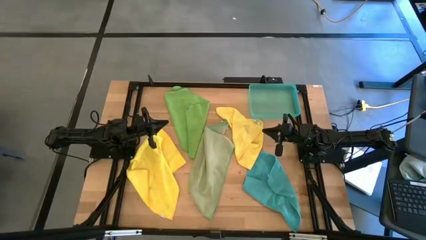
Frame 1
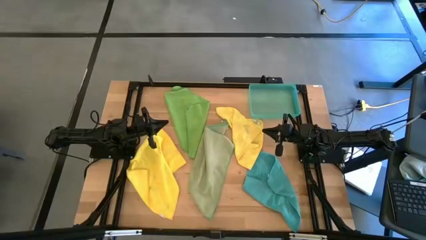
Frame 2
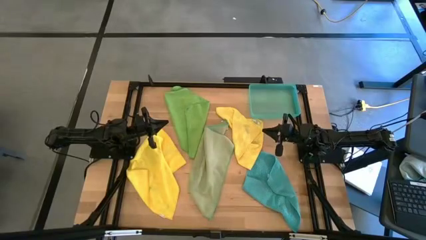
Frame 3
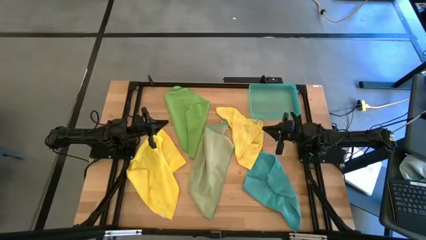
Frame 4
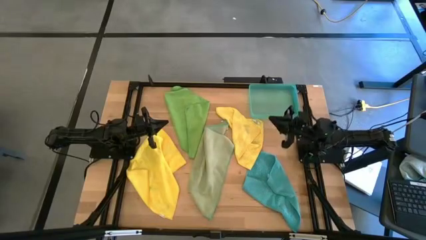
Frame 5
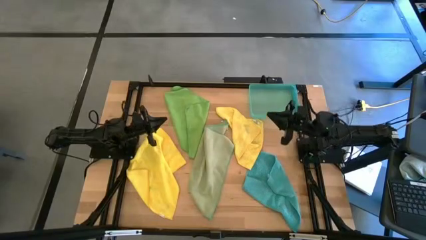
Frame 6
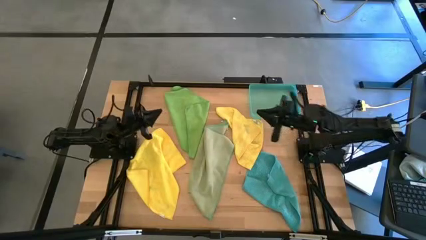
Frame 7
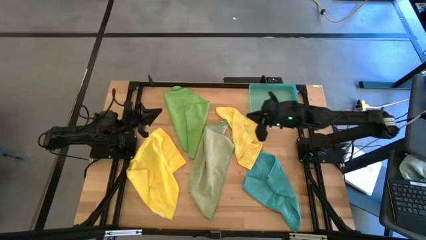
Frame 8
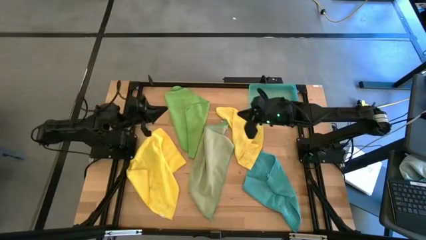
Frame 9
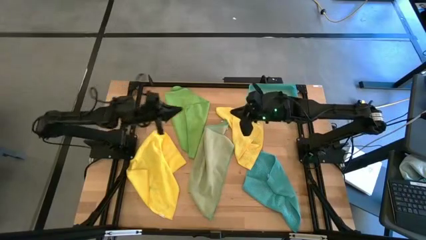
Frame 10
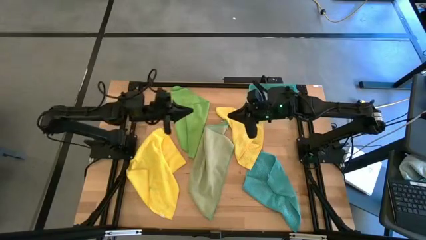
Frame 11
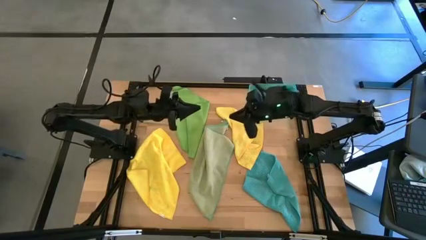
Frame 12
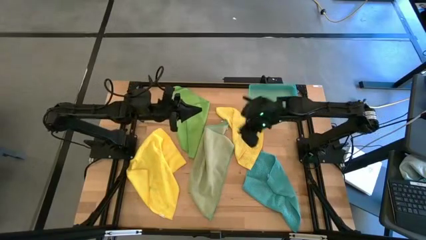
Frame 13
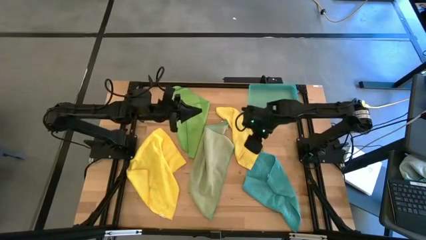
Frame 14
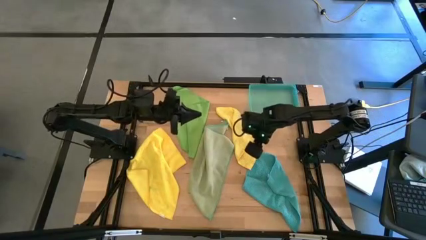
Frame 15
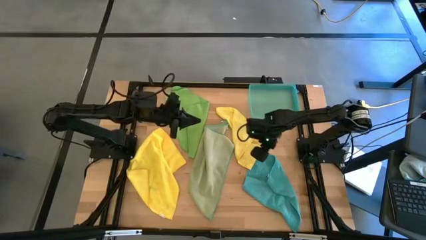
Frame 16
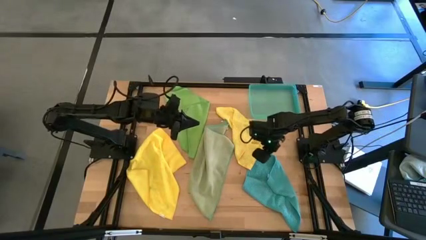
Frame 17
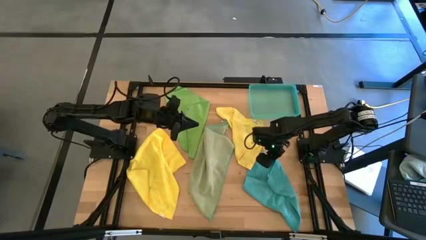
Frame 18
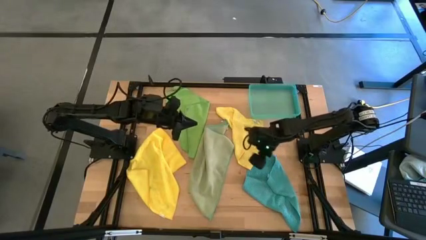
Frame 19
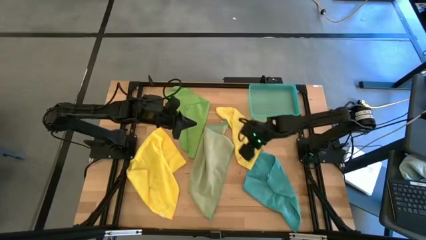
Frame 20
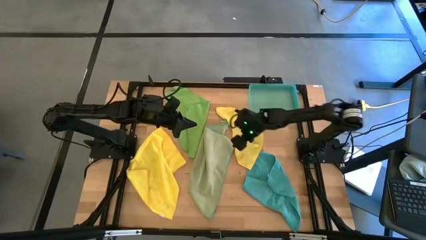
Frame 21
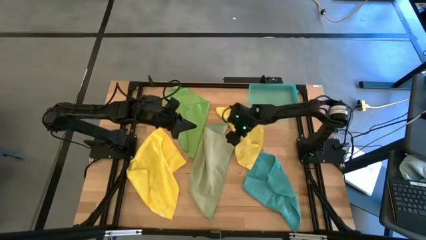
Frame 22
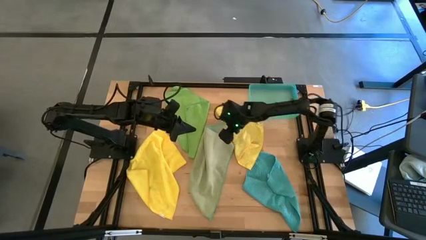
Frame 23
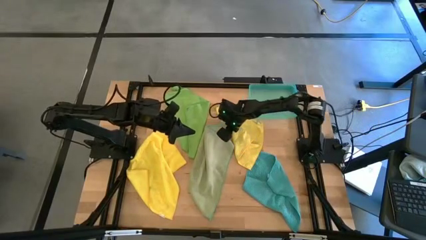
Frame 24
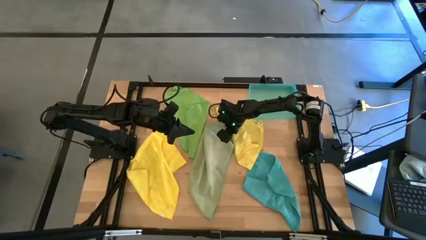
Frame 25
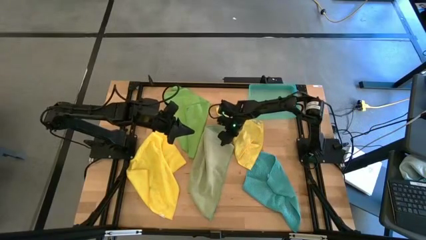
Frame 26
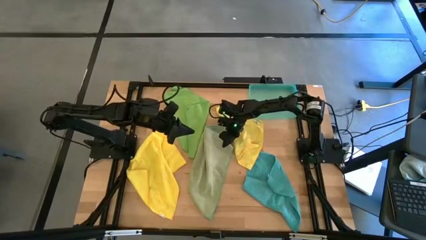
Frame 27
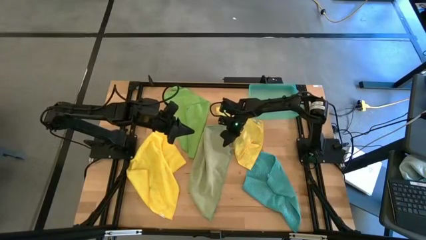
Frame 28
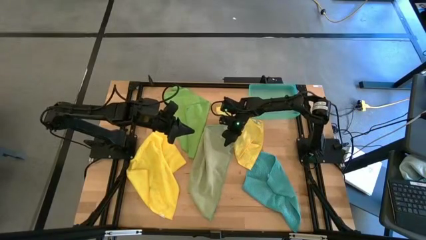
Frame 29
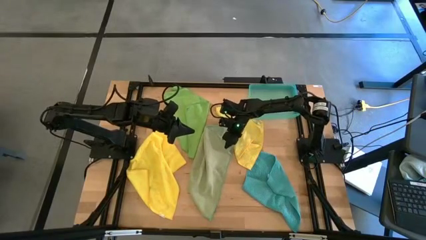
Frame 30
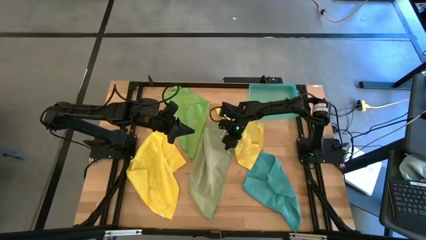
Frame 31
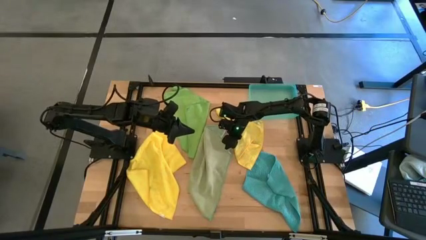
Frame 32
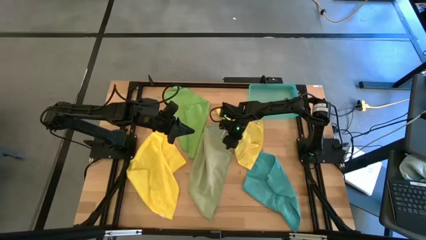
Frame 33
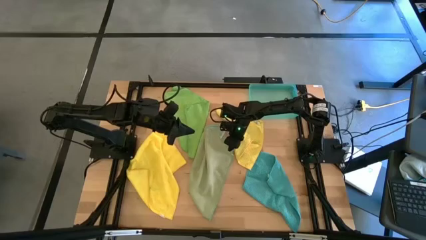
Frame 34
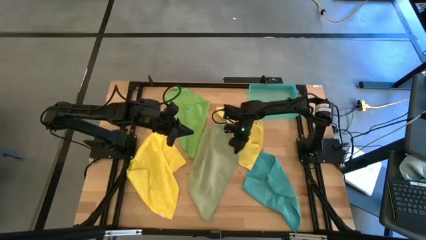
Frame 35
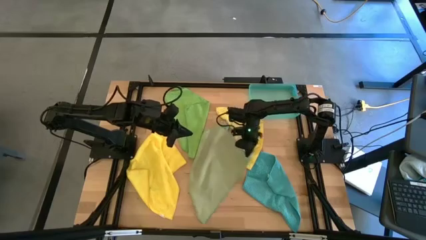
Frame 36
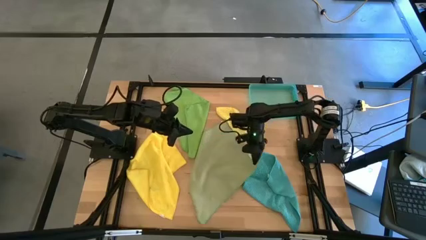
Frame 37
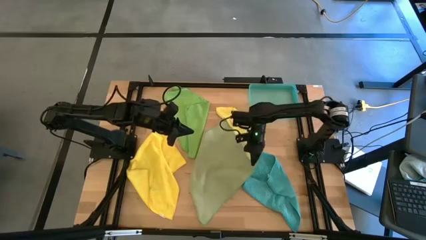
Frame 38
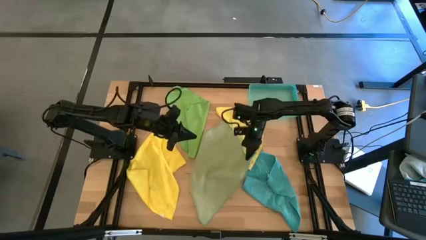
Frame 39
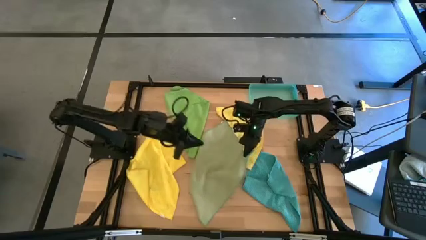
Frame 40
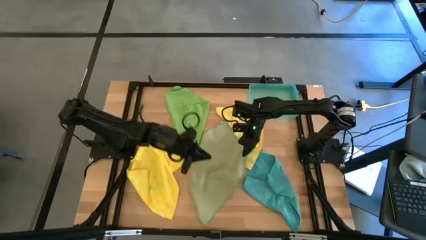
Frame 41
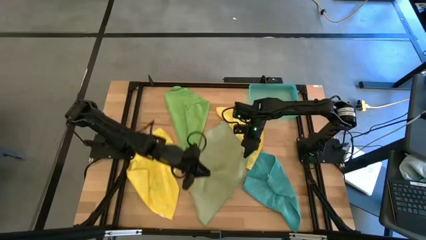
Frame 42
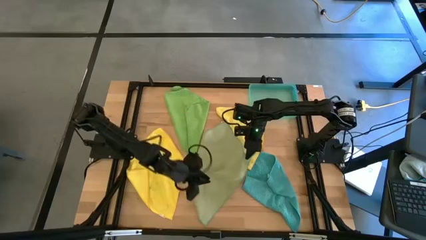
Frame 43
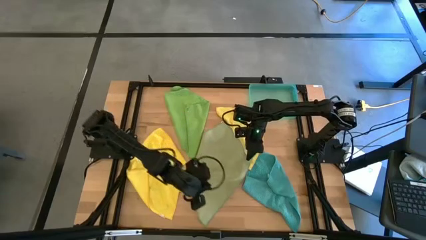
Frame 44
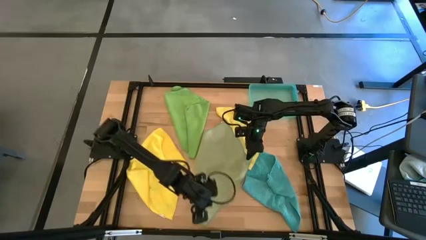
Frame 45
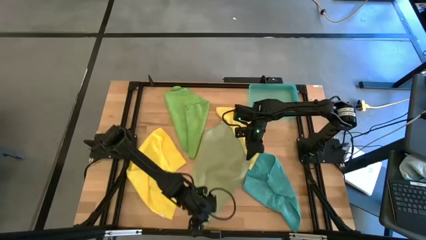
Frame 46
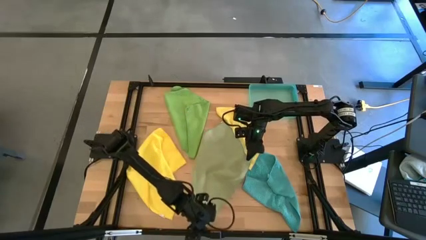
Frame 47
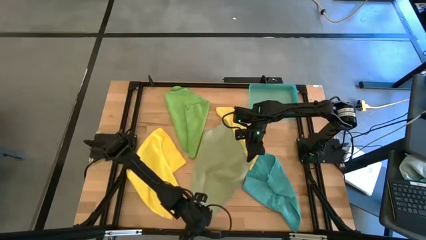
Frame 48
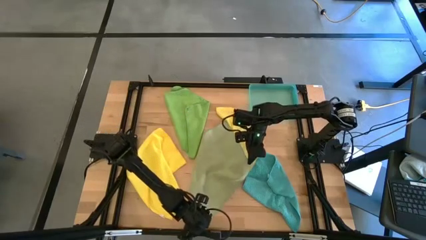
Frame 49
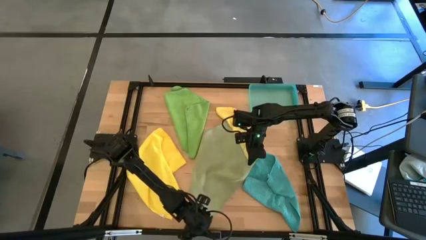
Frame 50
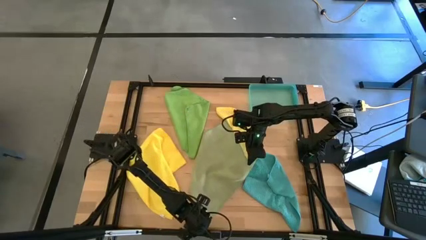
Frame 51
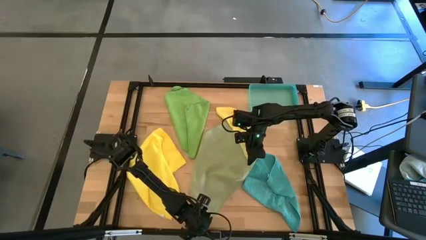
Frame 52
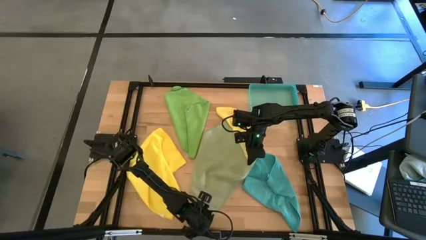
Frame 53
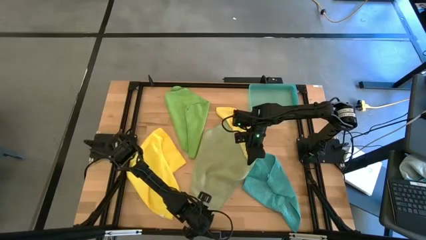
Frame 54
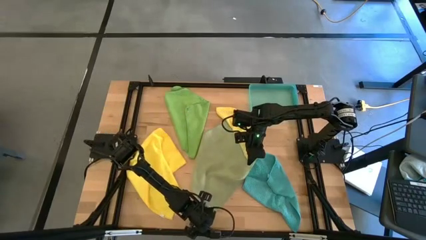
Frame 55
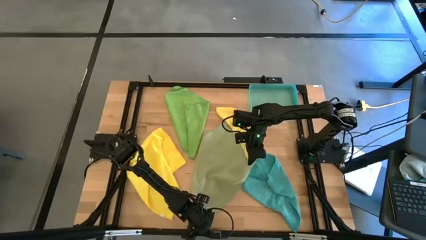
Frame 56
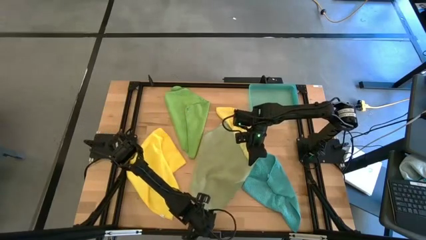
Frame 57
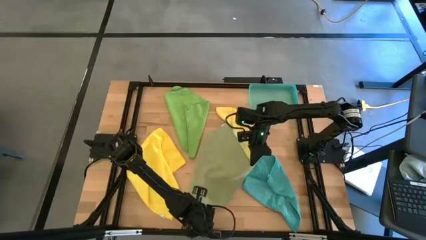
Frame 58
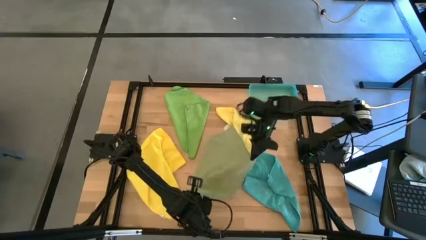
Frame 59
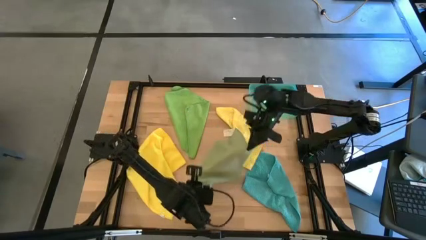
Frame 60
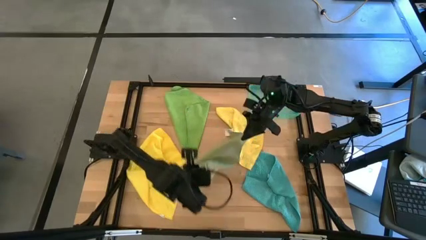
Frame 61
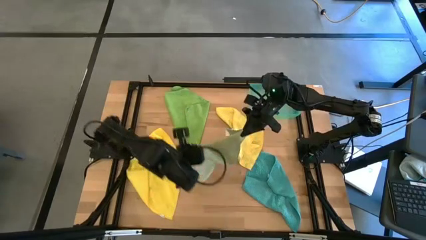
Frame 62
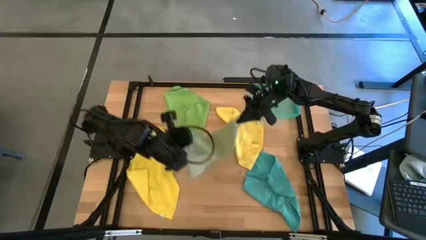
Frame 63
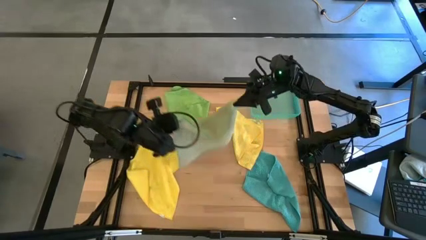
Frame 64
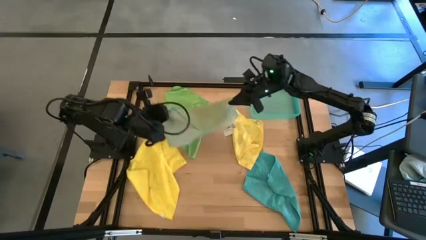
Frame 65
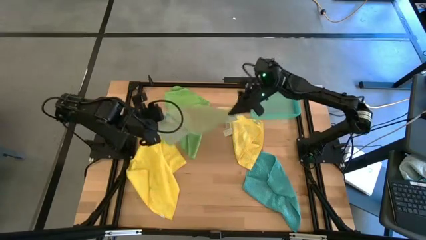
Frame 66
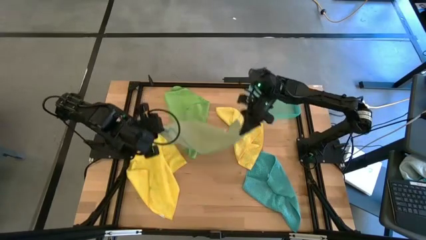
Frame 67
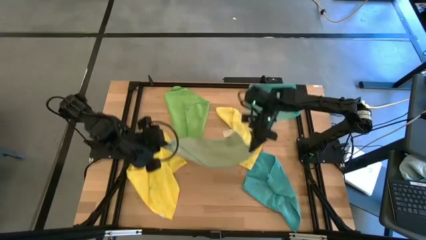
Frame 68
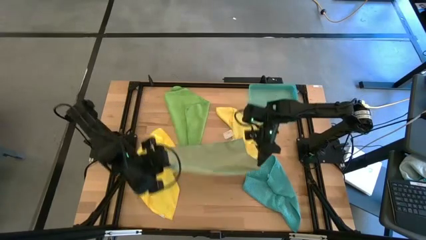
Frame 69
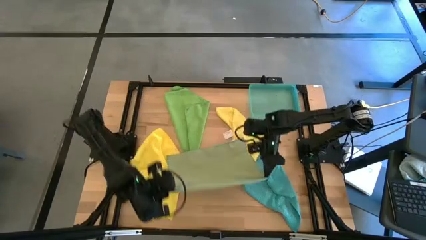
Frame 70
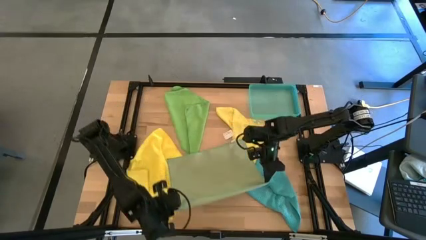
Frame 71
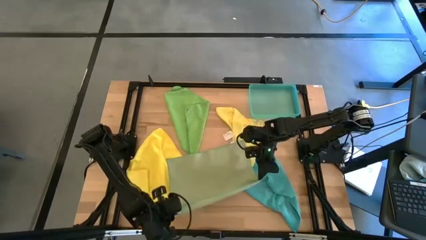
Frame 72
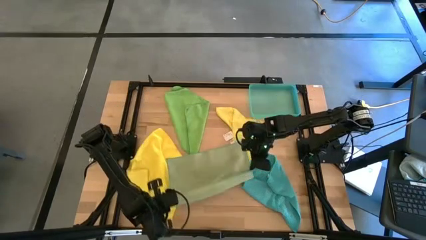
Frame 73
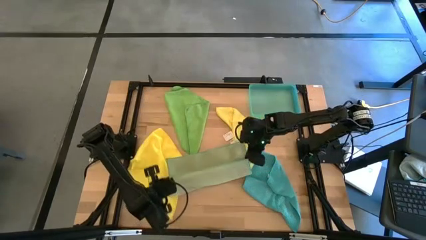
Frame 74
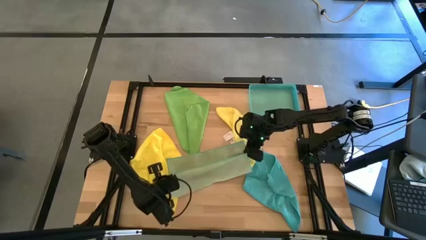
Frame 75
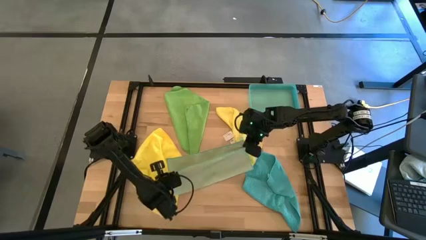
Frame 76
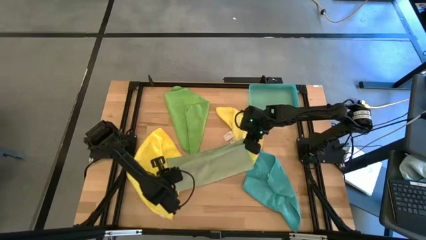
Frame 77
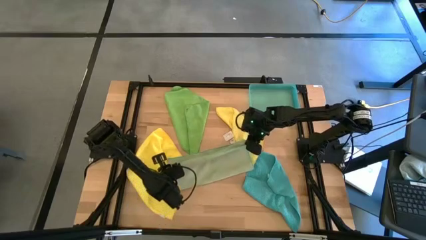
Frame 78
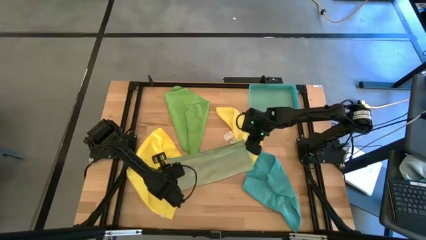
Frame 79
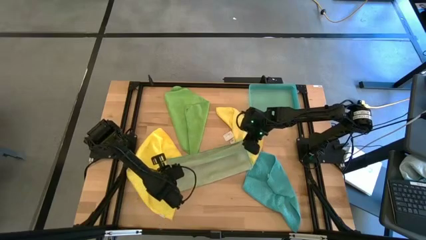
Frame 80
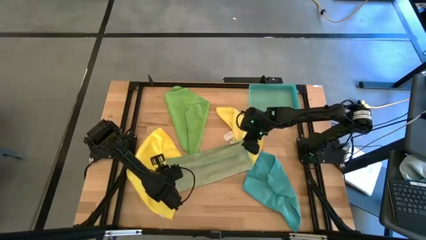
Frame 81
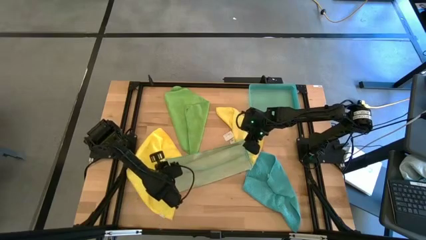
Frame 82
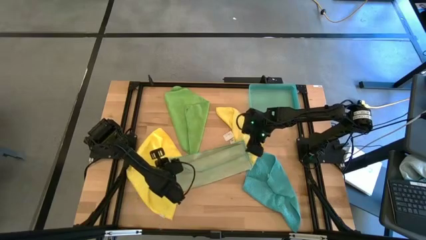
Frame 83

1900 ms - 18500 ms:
Task: Fold microfiber towels
Fold the light green microfiber cloth
